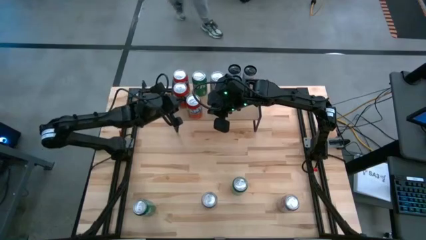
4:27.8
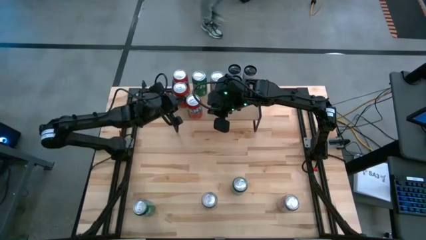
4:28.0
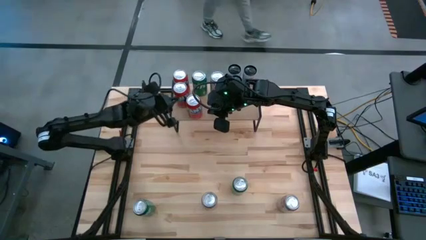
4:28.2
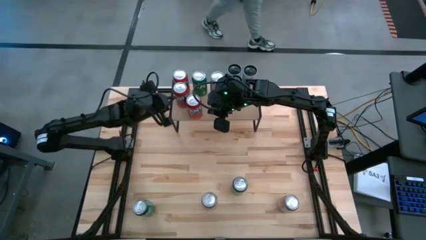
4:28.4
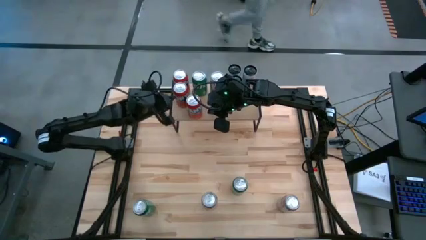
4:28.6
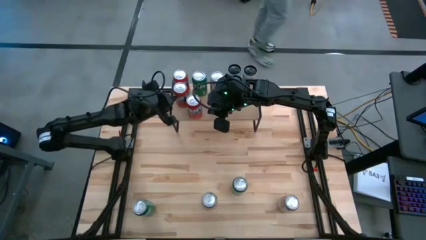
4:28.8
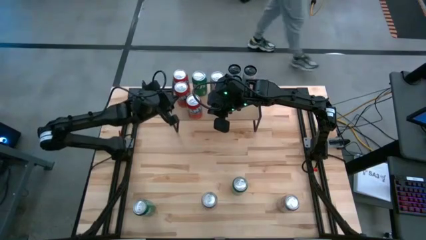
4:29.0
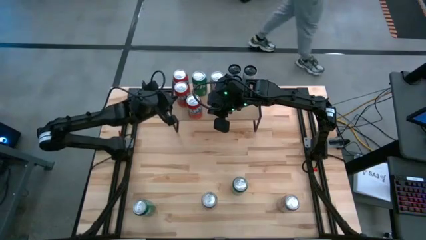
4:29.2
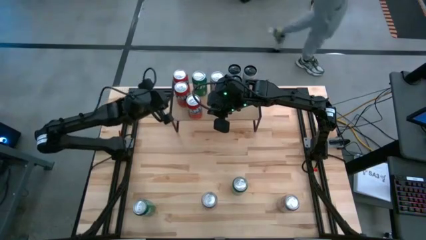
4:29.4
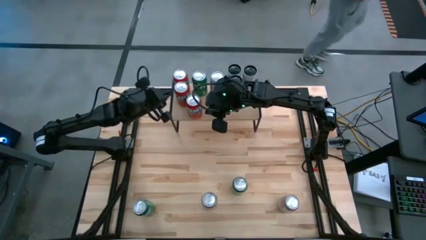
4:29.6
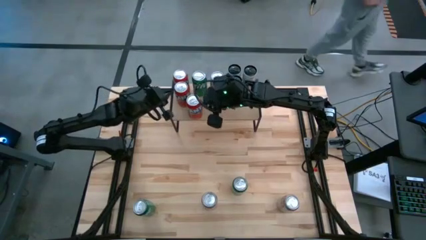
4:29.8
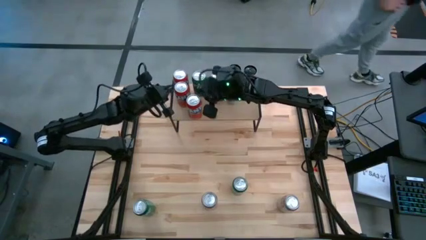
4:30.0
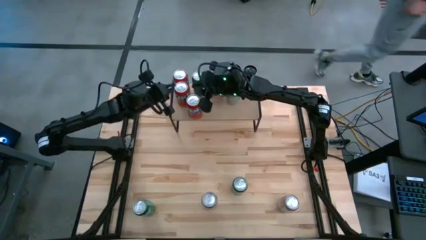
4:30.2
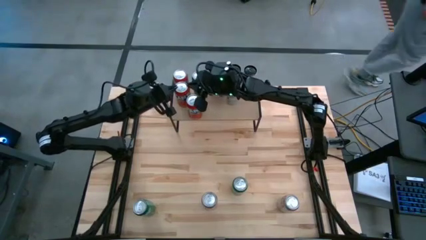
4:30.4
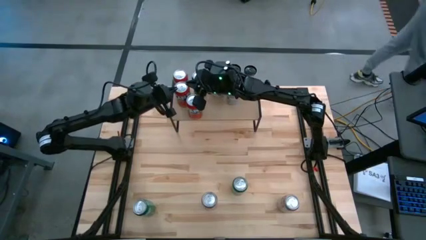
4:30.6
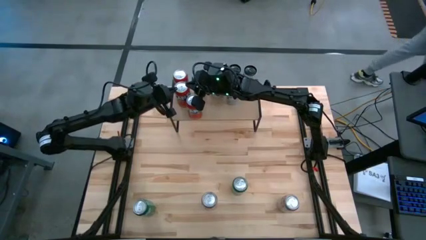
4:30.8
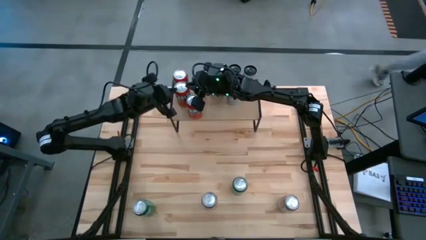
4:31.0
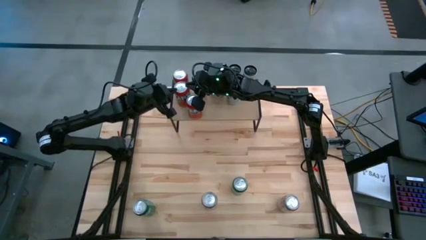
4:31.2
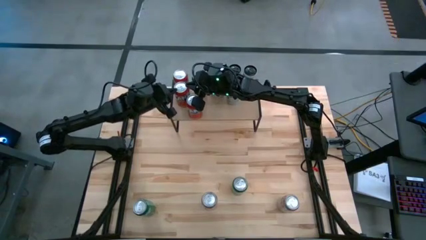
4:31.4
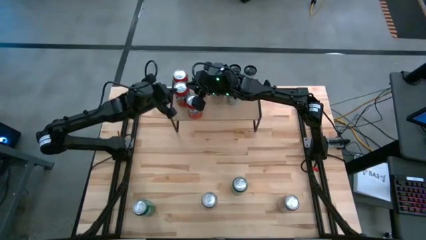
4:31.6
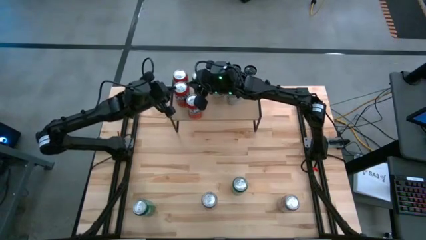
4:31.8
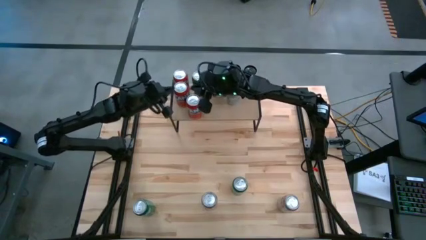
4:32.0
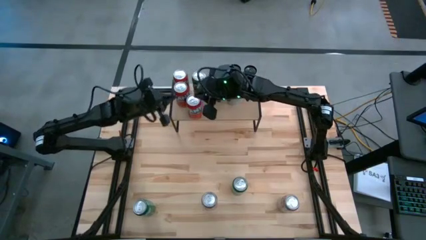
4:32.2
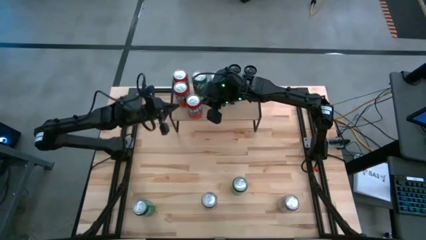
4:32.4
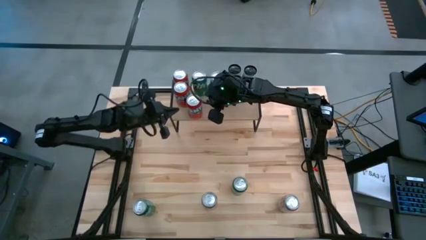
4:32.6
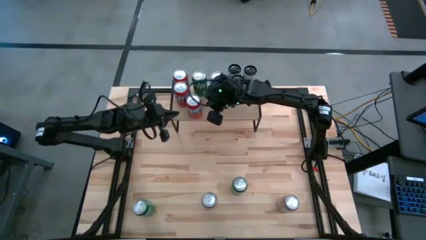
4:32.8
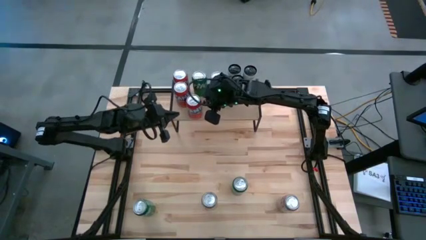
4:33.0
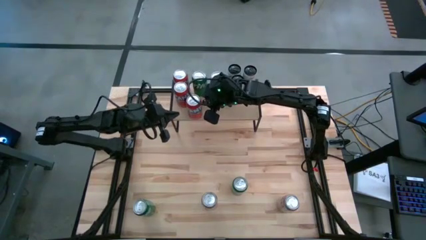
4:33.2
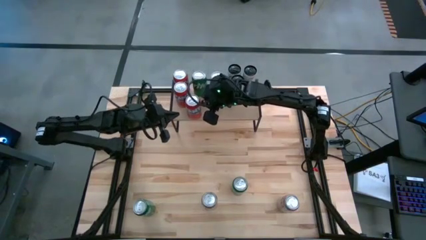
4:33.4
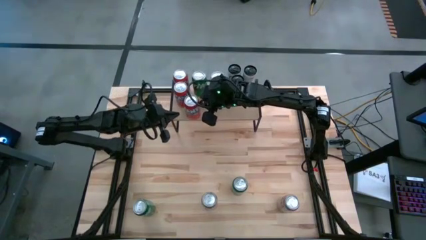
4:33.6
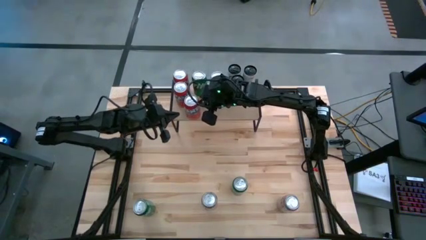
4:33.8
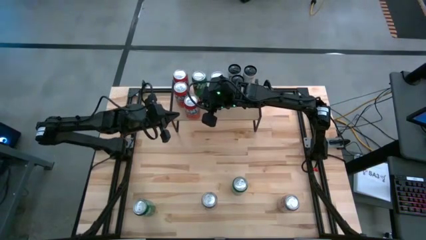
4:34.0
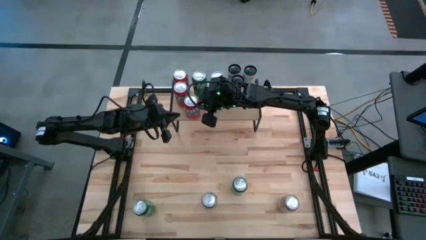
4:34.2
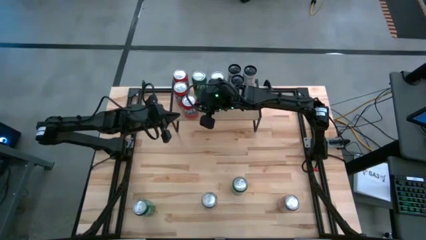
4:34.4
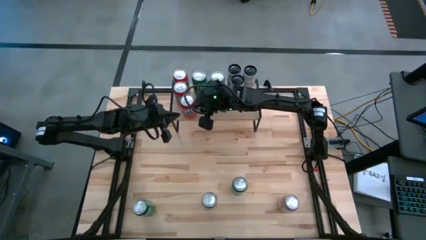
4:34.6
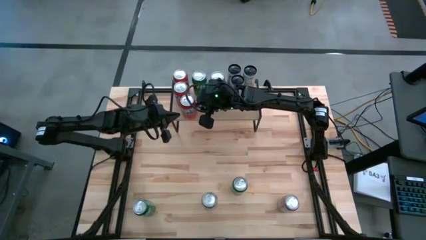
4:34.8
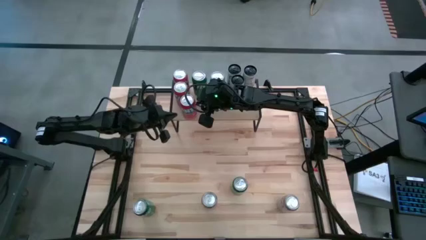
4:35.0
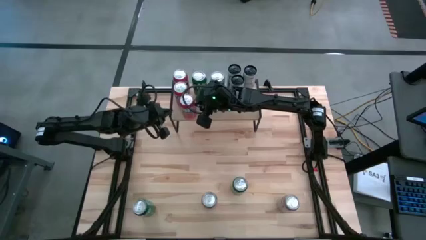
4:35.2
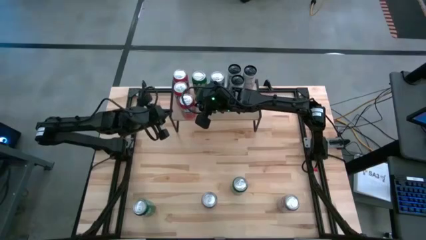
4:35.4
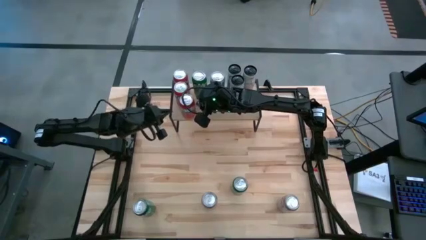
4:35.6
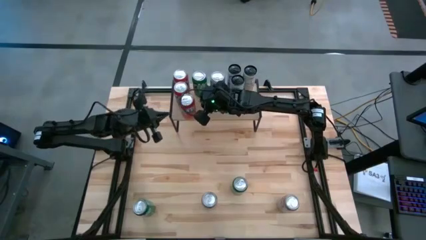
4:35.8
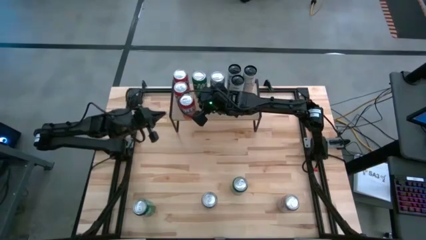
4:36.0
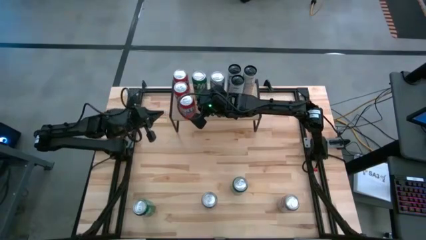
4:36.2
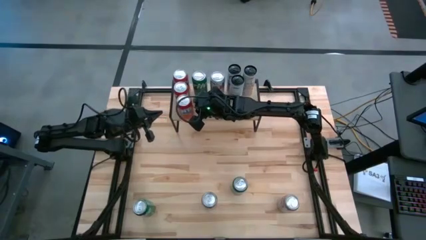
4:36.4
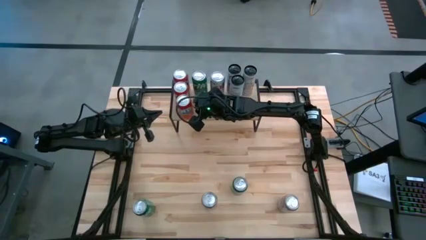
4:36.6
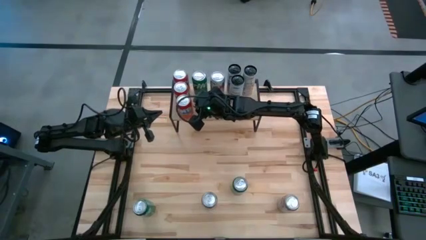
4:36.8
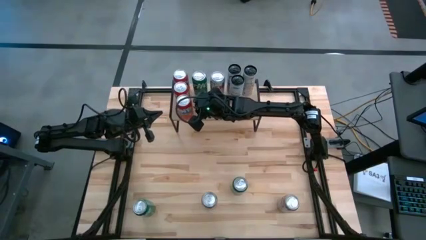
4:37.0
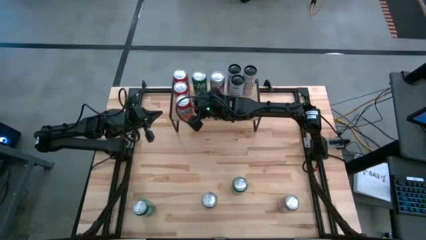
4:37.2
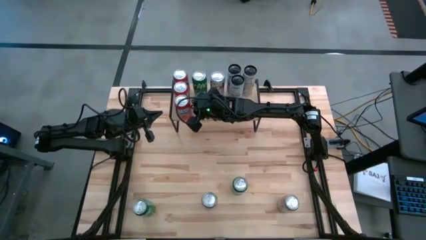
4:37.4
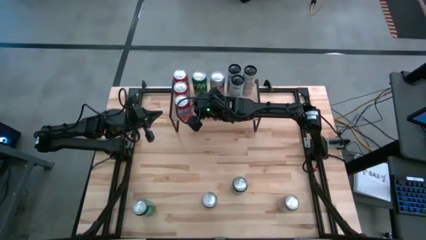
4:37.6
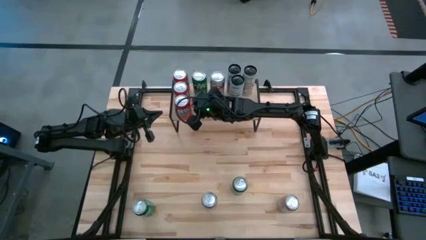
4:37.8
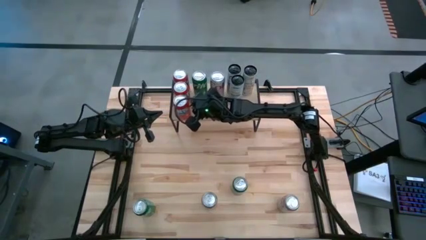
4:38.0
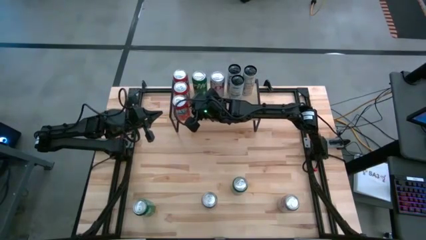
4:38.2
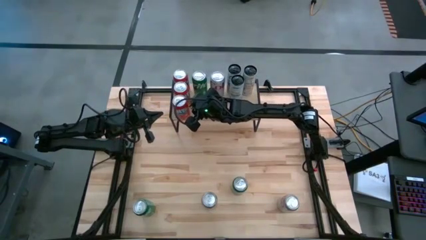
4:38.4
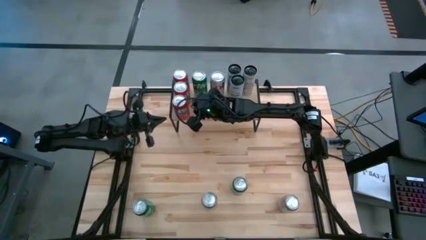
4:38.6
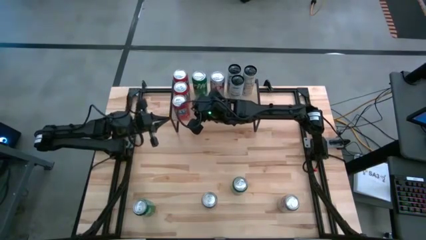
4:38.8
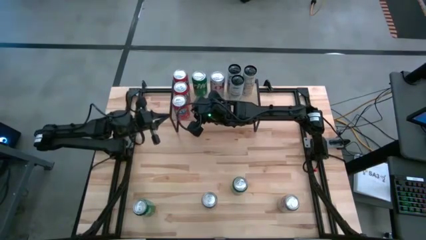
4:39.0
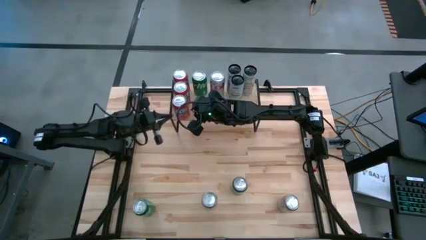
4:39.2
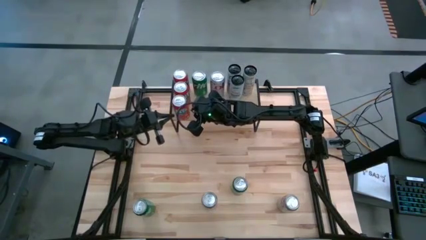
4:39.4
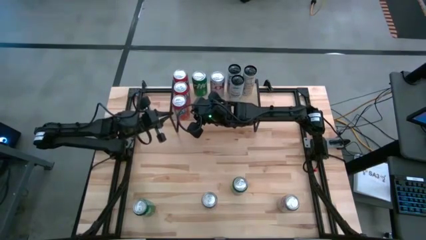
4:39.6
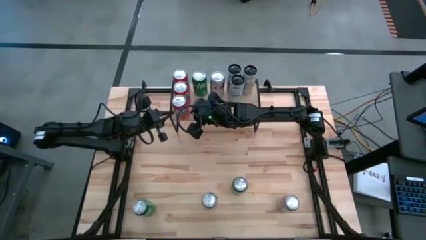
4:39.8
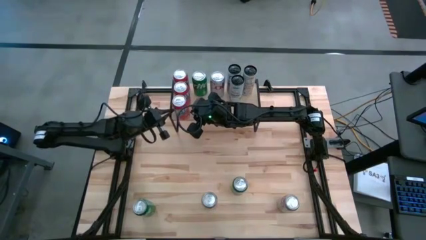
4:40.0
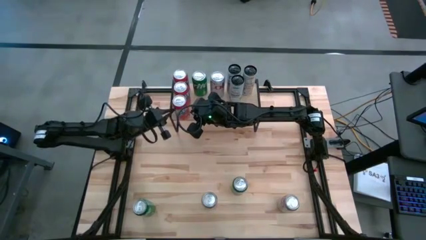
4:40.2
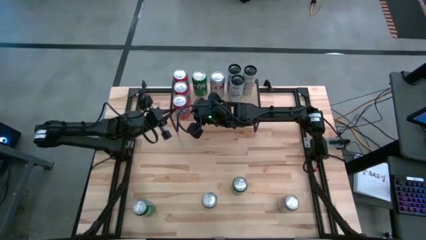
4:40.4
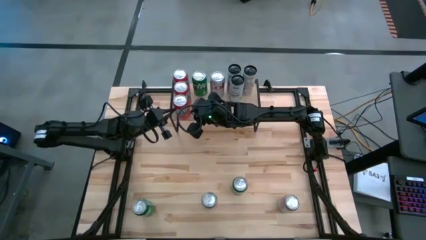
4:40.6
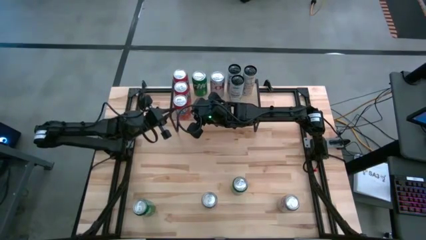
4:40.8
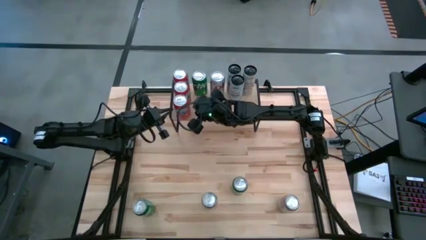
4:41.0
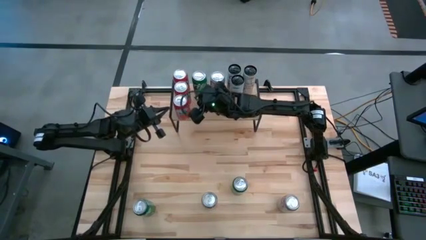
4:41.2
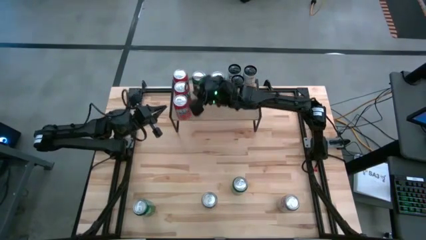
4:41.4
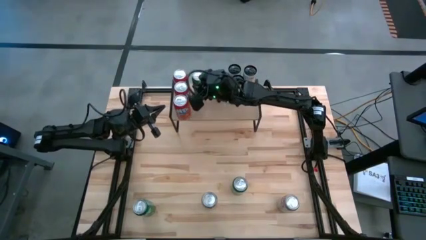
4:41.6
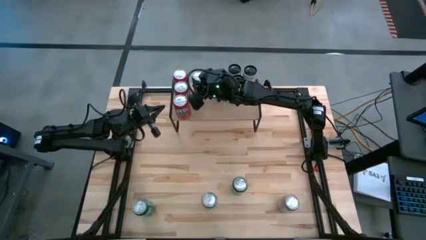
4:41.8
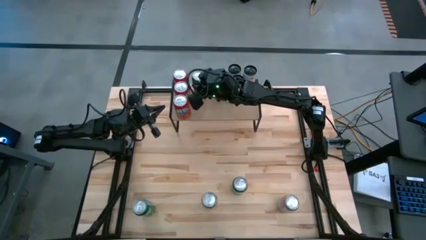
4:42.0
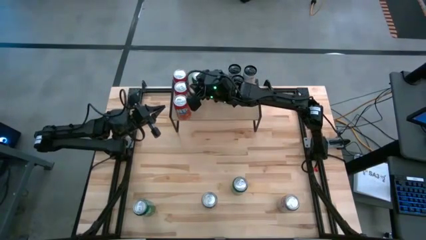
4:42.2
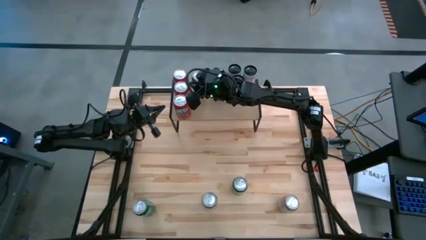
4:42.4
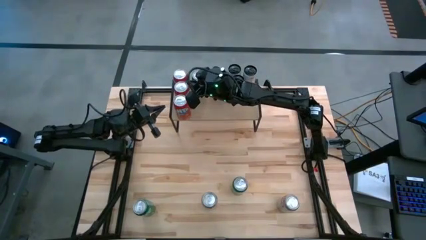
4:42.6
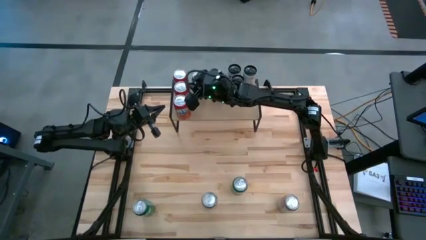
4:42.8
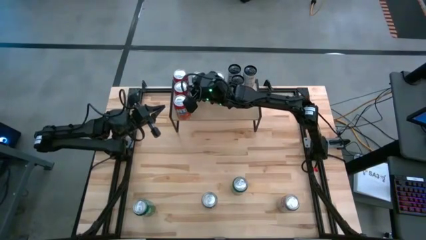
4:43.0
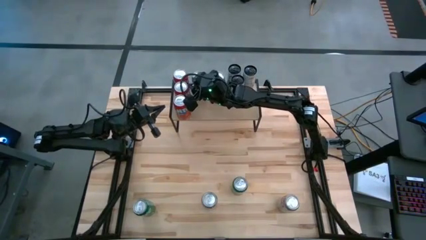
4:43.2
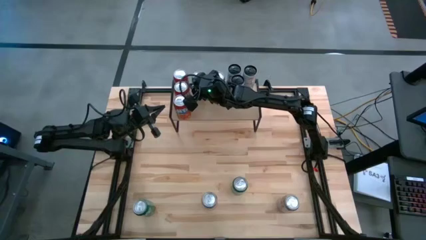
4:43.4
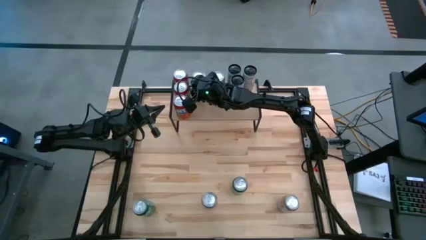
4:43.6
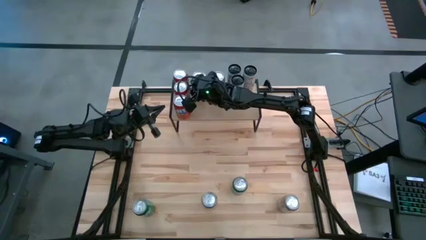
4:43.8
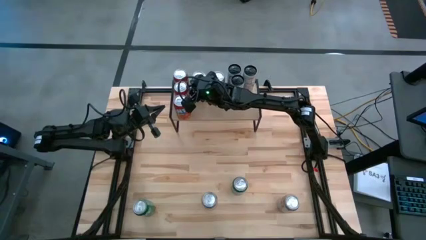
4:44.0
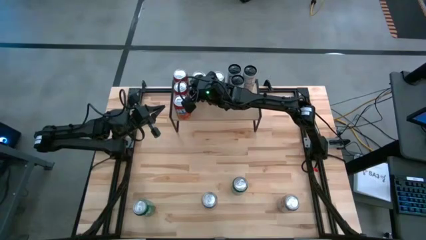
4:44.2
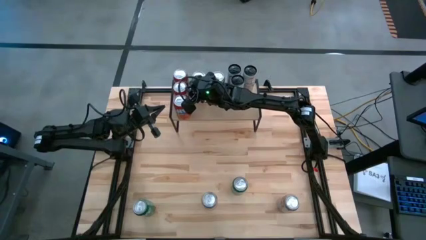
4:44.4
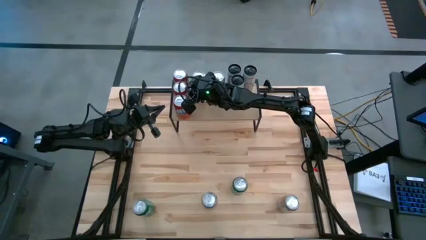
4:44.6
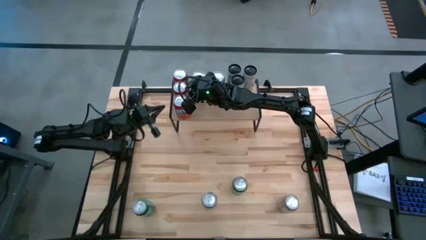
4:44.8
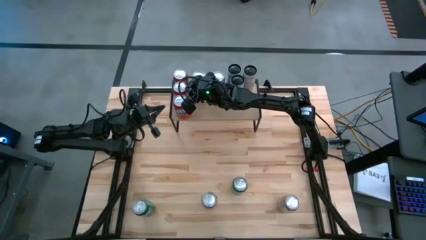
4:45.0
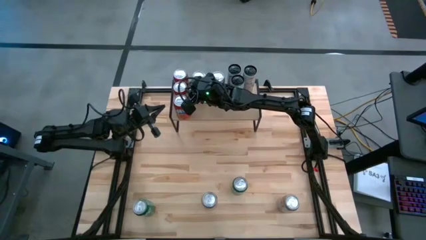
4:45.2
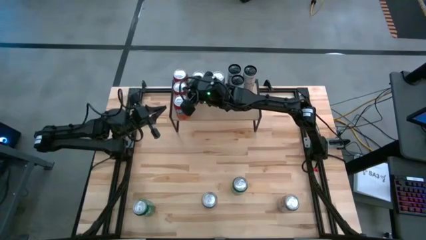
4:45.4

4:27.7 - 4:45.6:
Task: Place canned beverage on shelf
Adjust the orange soda cans
